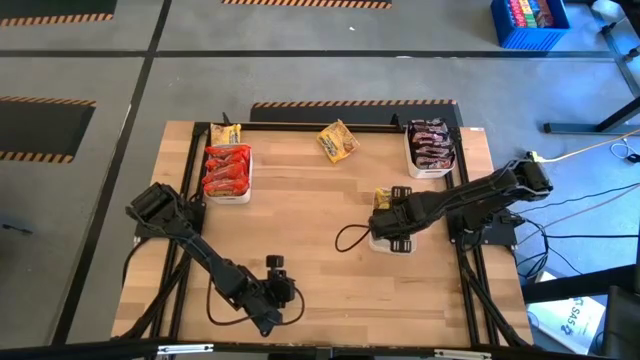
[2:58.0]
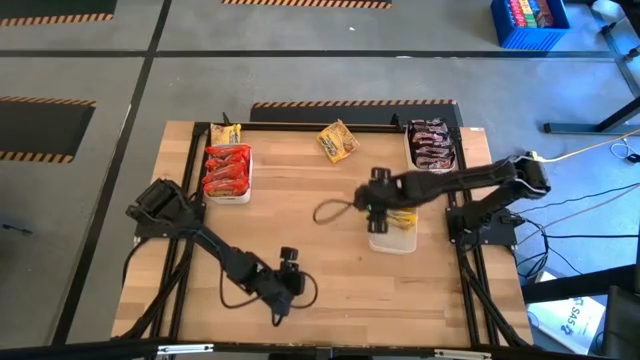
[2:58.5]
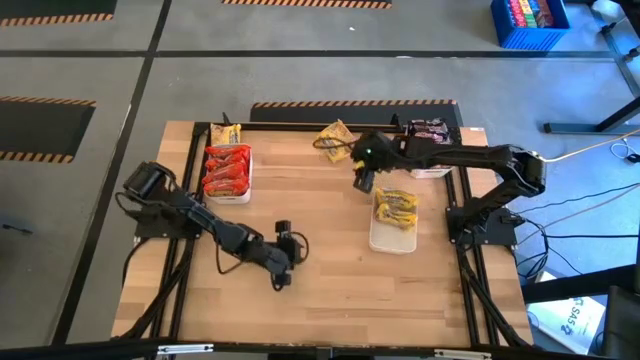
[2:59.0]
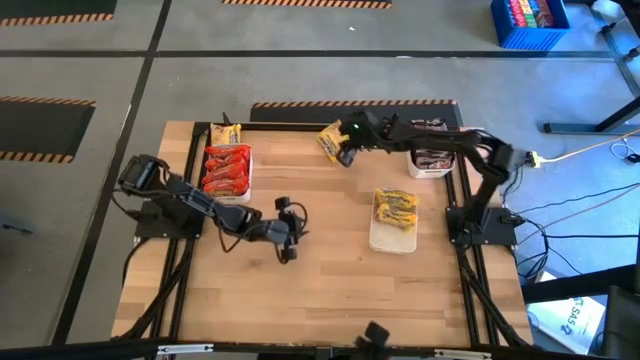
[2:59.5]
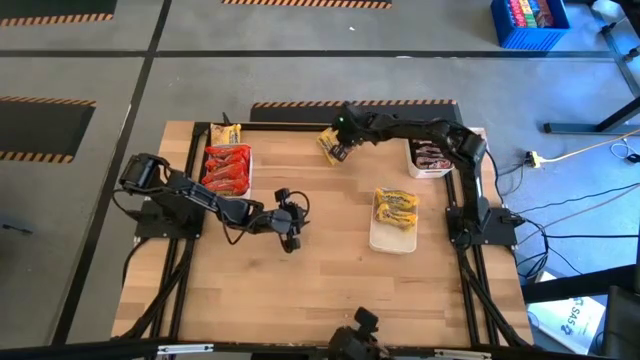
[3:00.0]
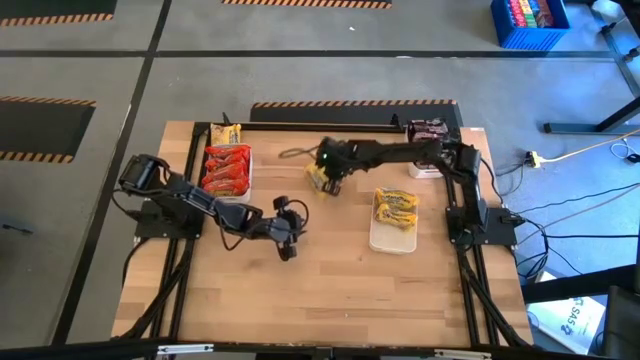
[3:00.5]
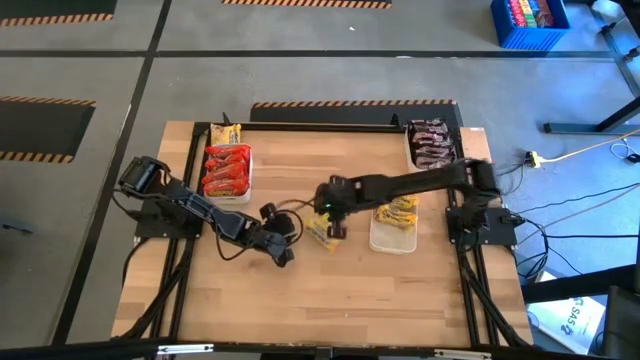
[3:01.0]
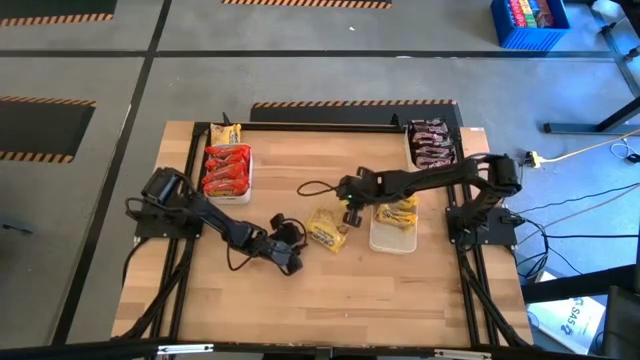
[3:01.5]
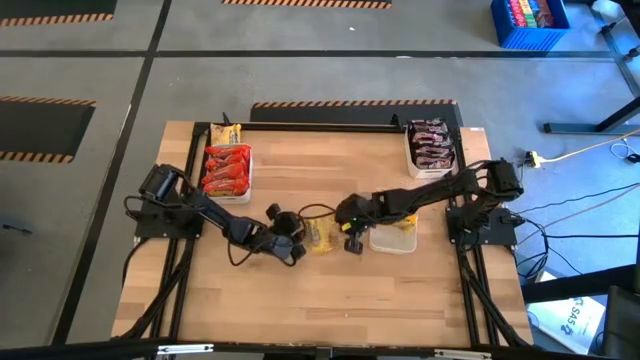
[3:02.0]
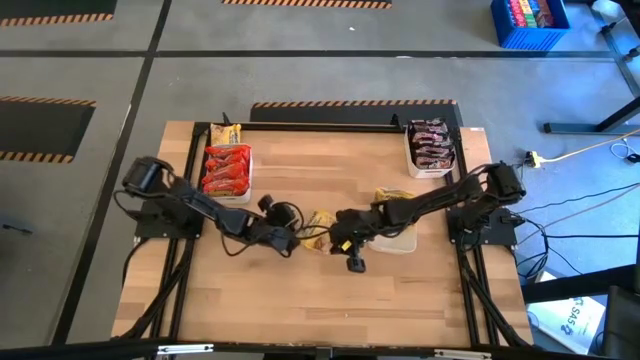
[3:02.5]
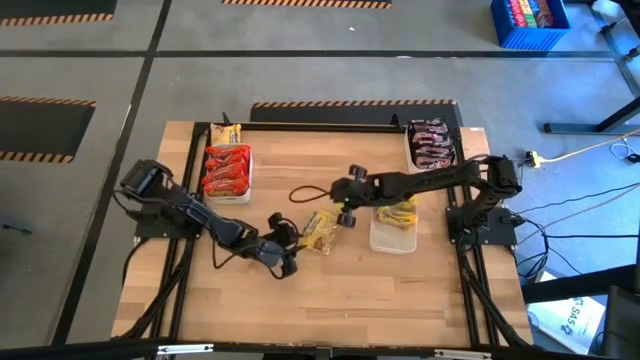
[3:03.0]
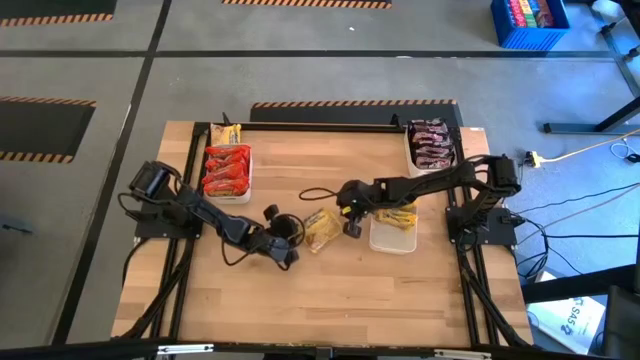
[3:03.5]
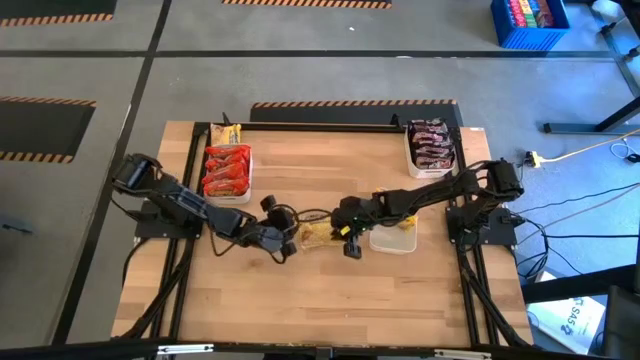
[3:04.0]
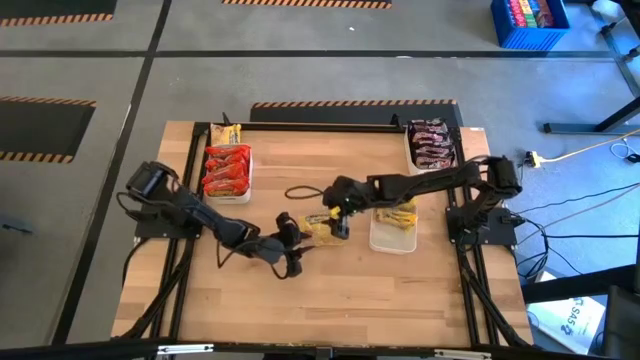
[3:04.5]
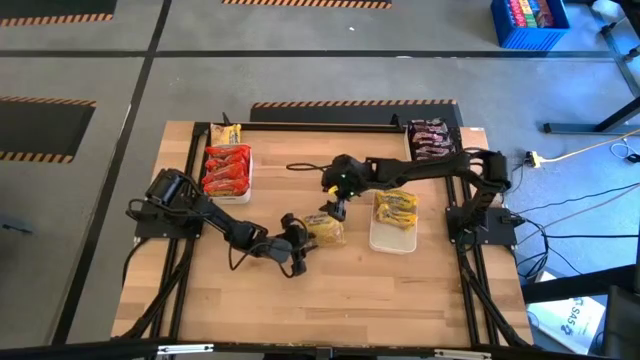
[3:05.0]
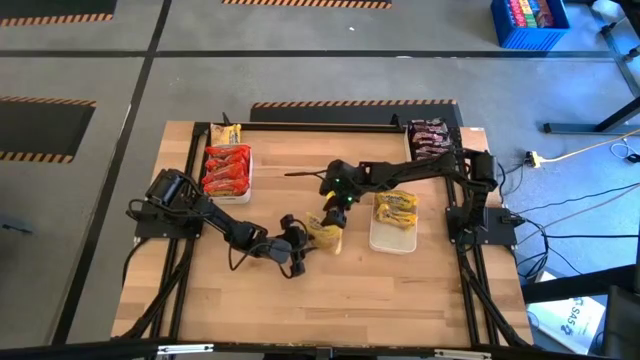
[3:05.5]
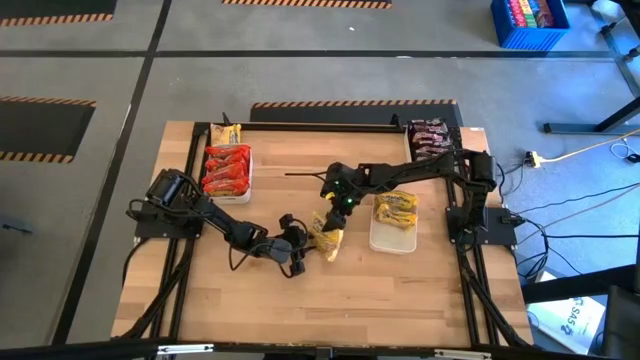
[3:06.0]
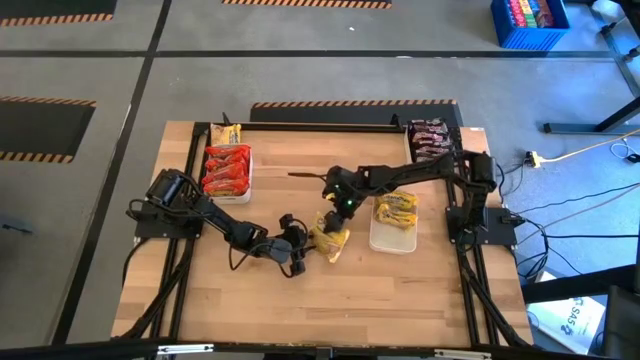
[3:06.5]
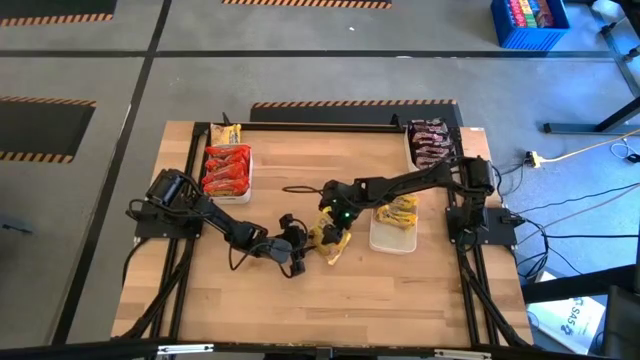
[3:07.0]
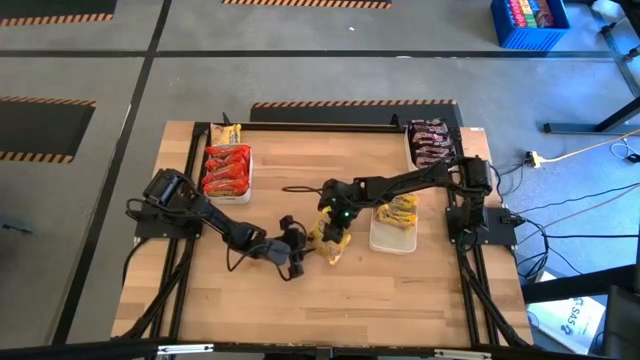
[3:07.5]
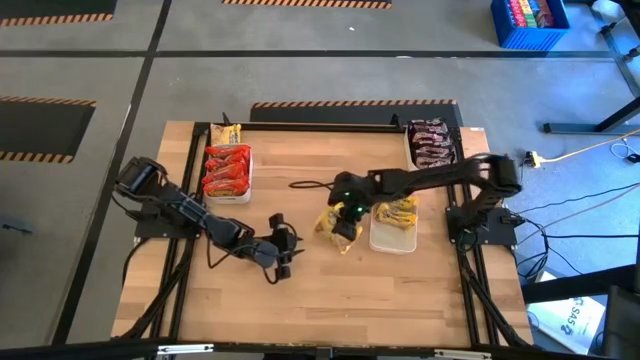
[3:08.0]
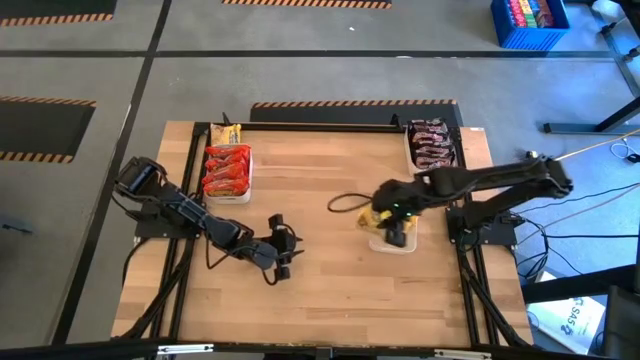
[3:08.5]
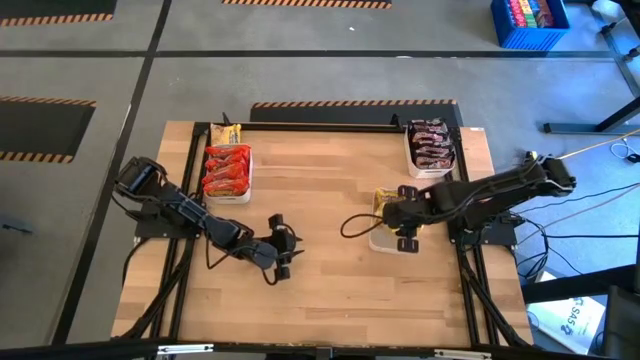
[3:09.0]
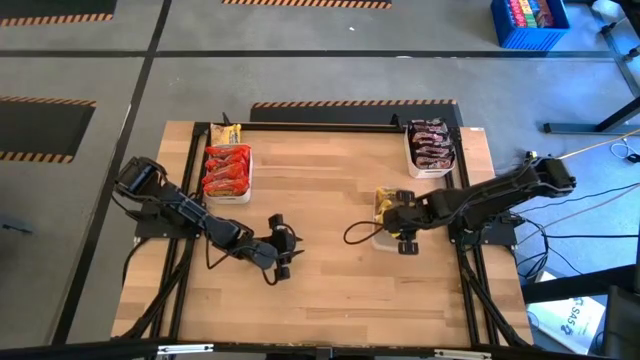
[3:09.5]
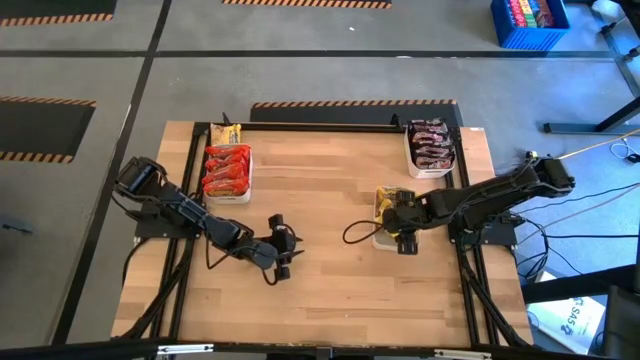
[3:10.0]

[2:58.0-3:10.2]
Task: Sort Maruchan noodles
Put the right yellow noodle into the bottom white bin

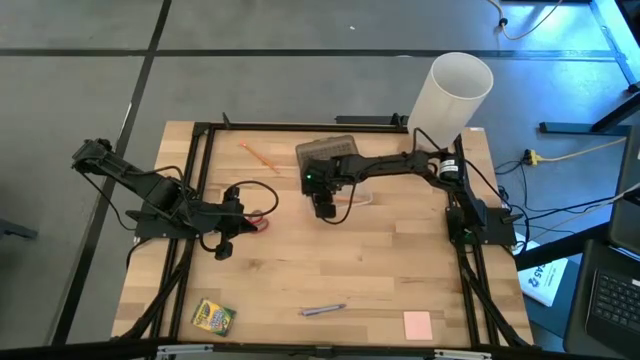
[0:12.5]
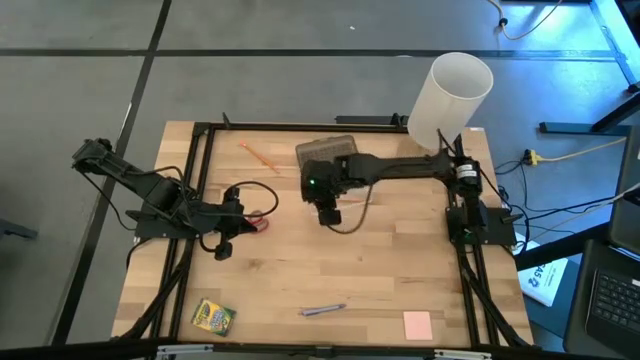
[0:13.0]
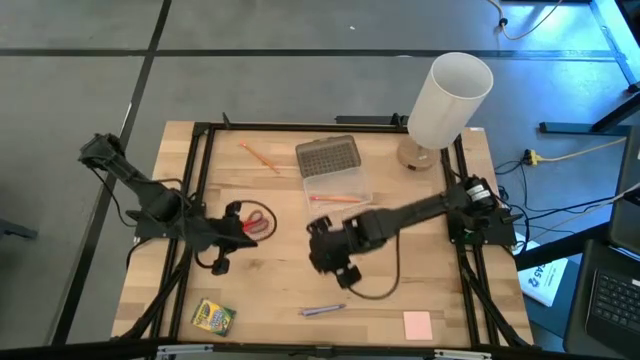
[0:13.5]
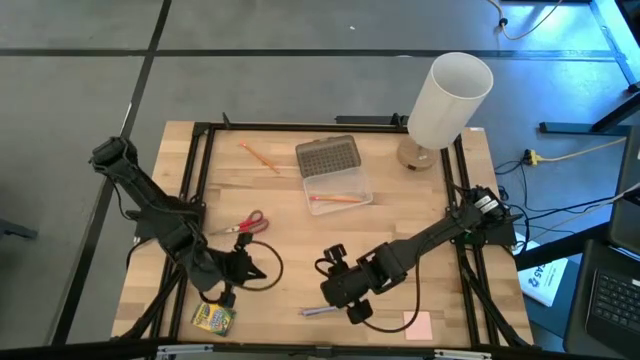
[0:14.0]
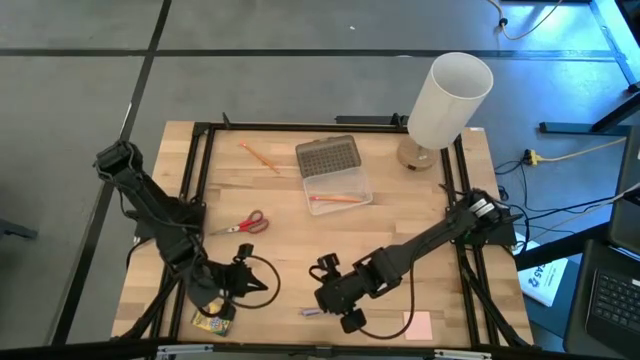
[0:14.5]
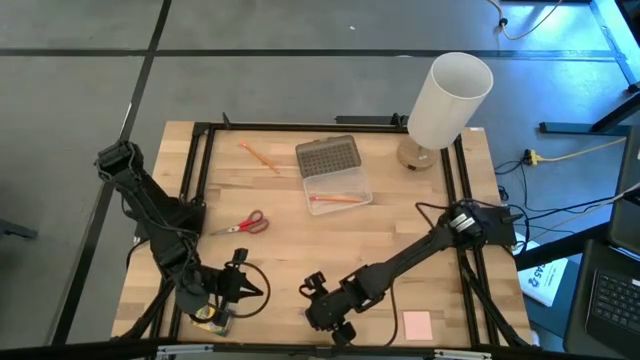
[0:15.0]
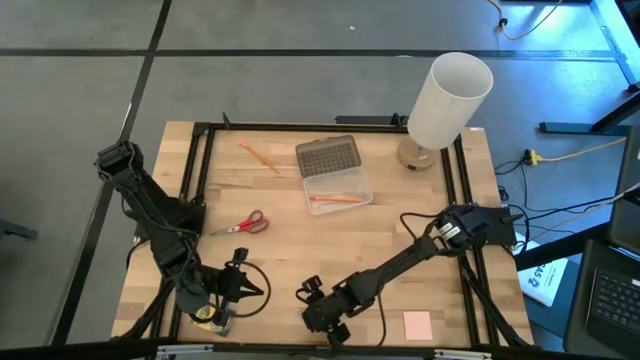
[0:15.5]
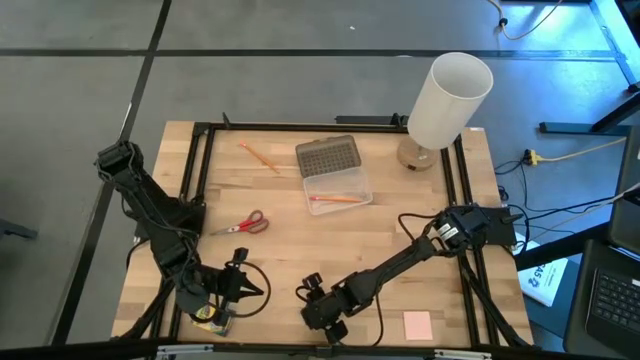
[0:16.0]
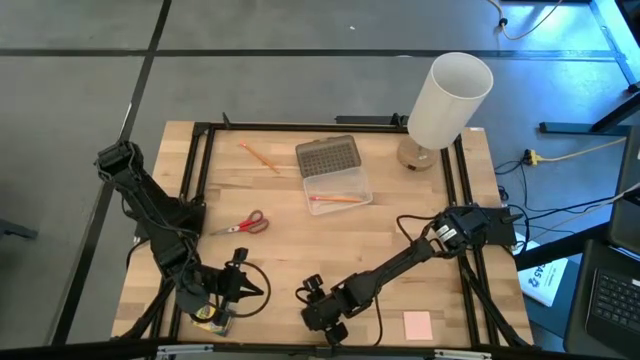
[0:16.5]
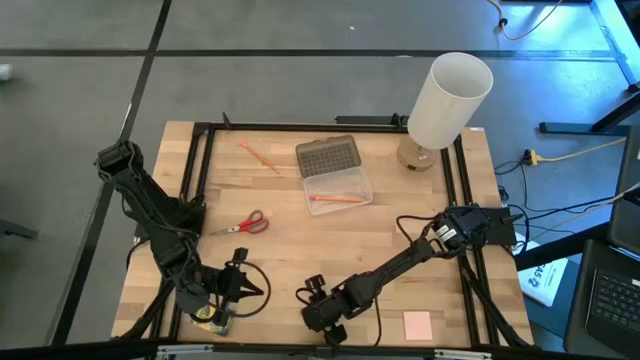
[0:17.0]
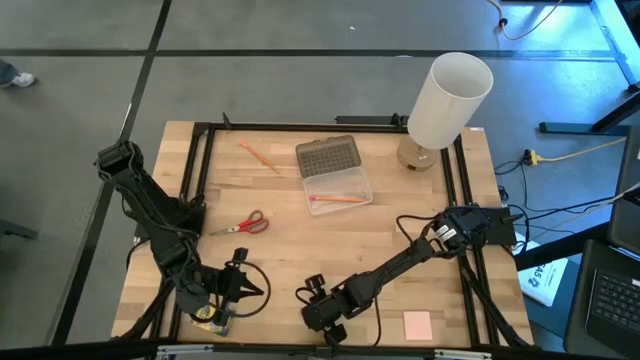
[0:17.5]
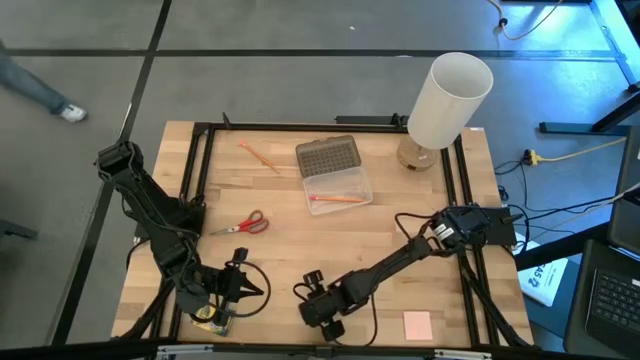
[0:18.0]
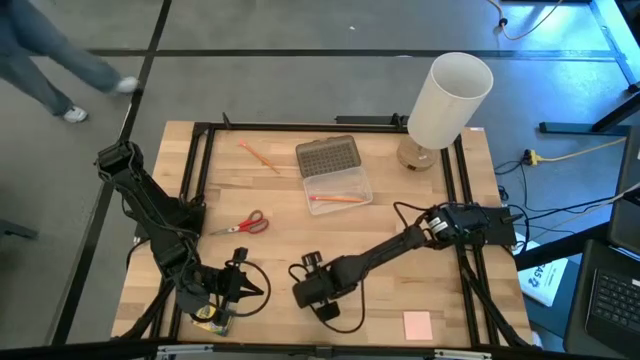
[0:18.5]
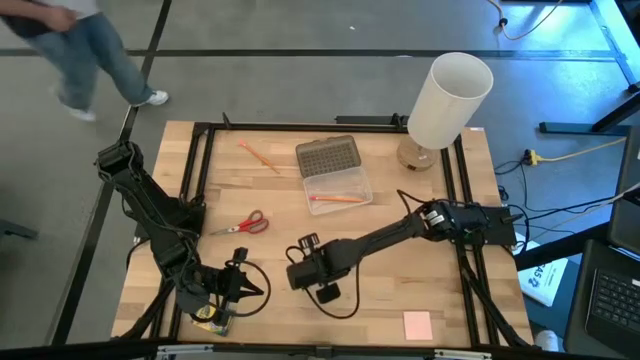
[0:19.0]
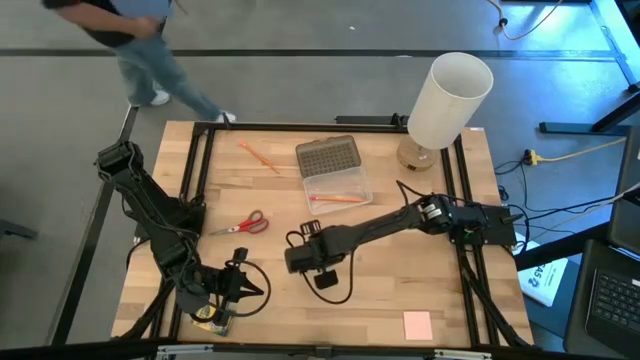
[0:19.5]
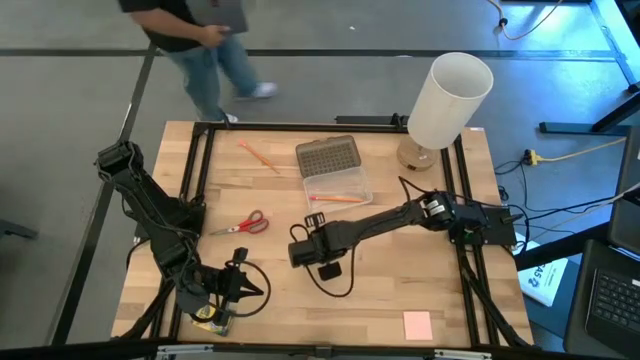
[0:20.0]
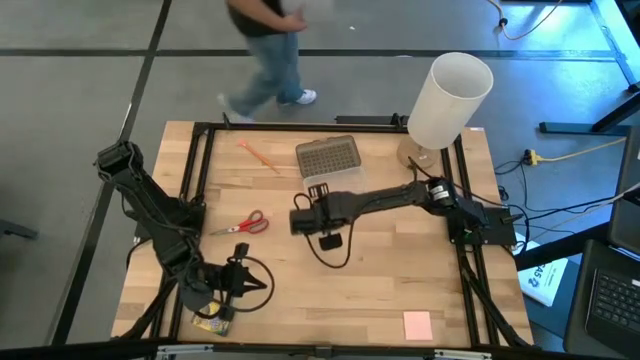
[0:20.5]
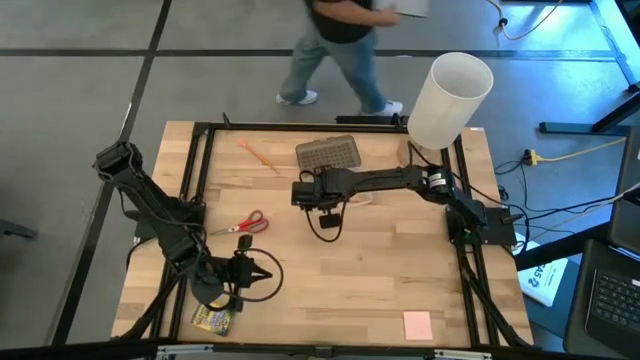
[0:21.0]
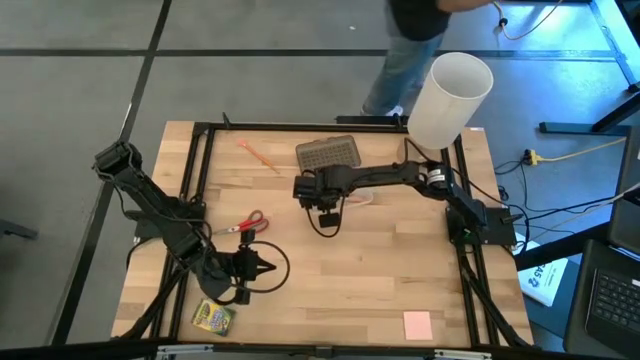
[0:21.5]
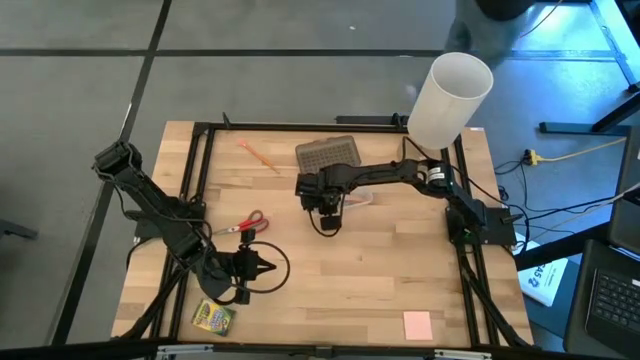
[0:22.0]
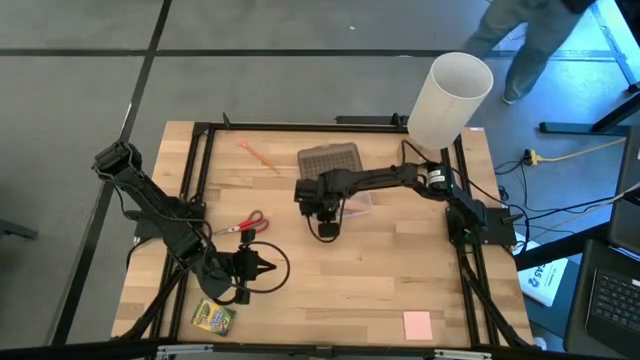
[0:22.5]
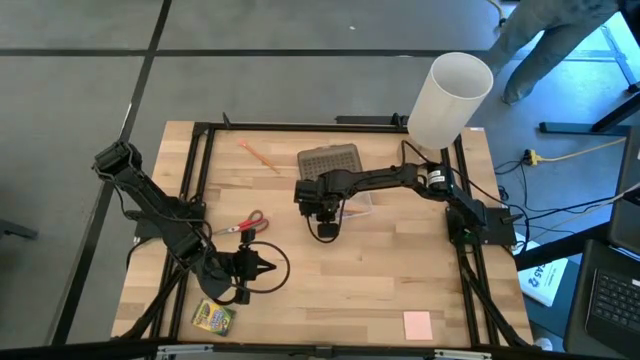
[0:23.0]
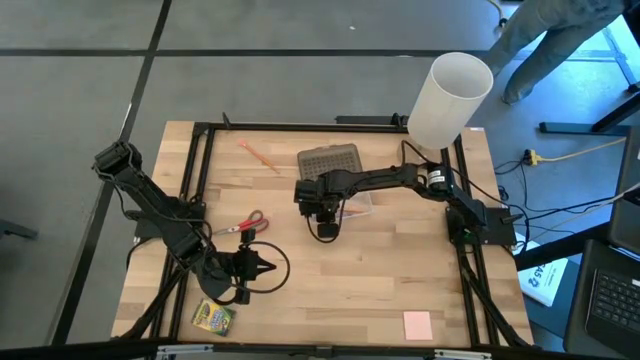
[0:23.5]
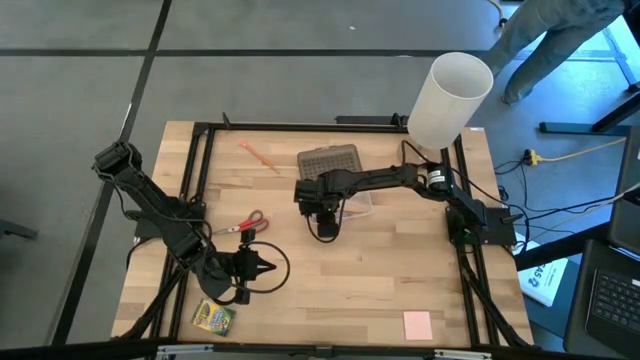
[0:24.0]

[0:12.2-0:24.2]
Task: Pack school essentials
Put the blue pen into the black supply box
